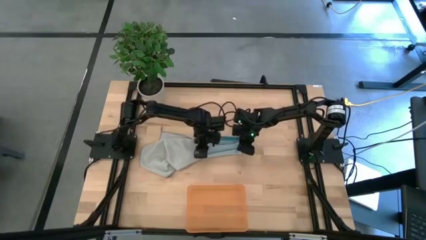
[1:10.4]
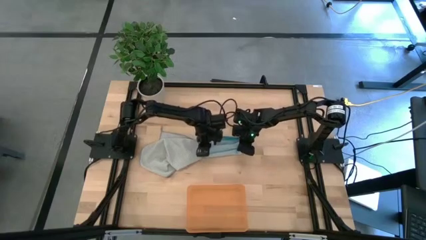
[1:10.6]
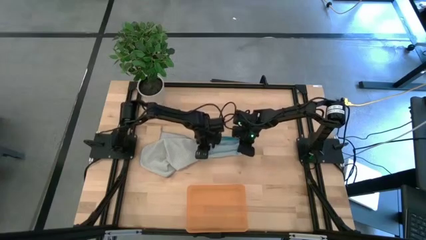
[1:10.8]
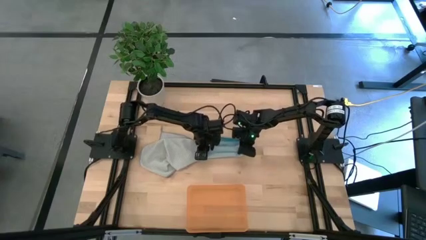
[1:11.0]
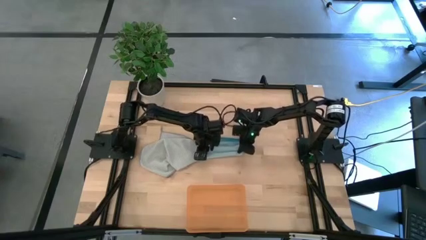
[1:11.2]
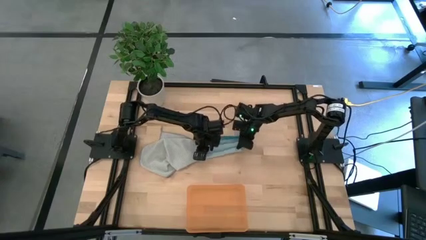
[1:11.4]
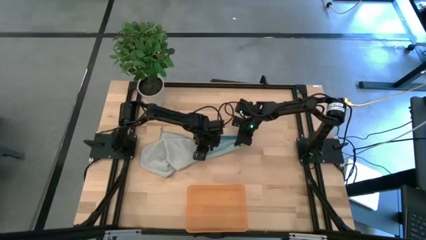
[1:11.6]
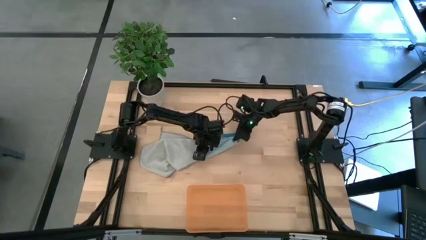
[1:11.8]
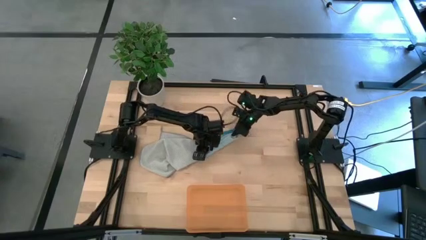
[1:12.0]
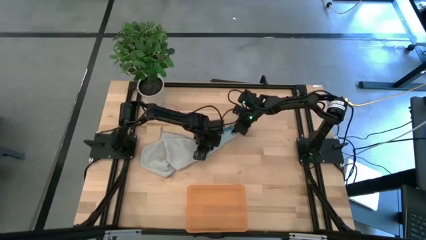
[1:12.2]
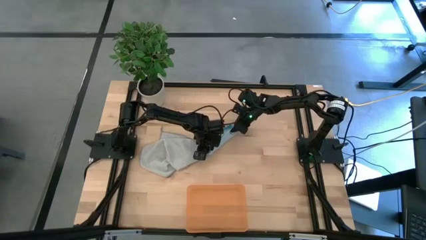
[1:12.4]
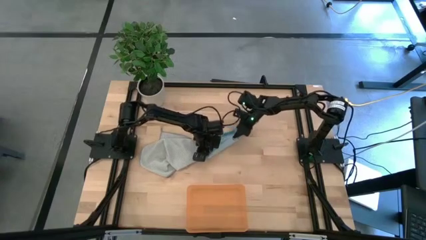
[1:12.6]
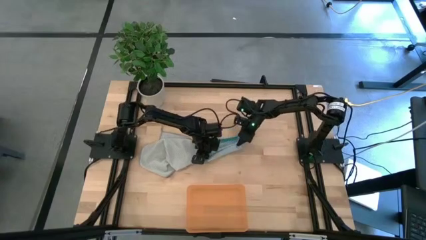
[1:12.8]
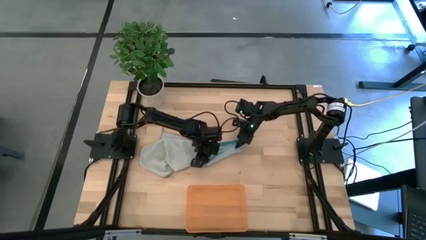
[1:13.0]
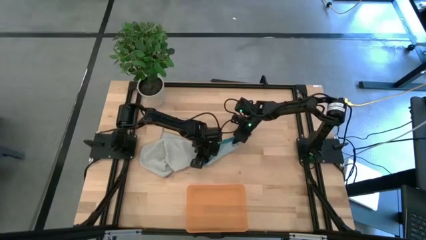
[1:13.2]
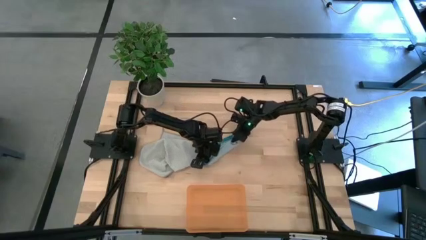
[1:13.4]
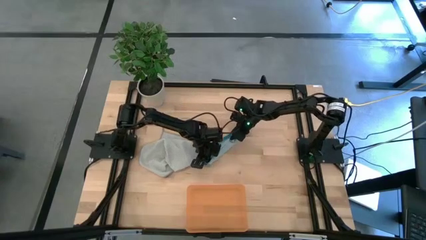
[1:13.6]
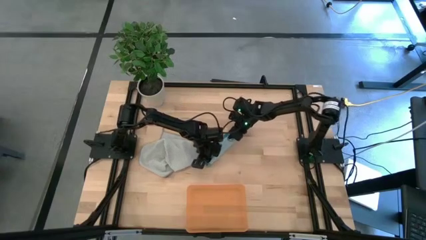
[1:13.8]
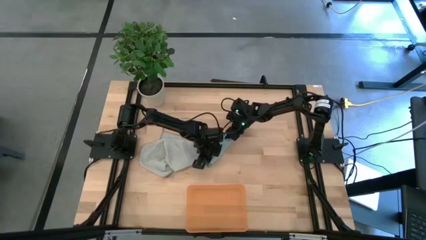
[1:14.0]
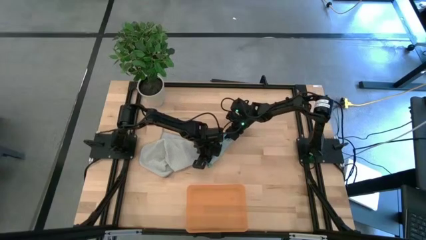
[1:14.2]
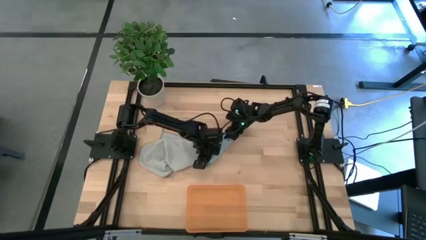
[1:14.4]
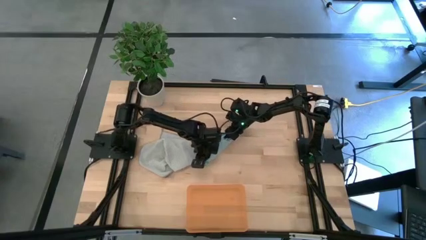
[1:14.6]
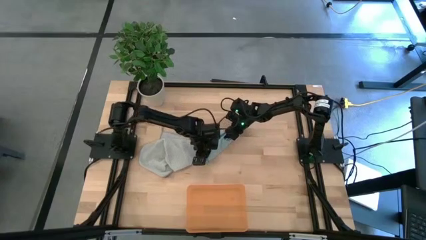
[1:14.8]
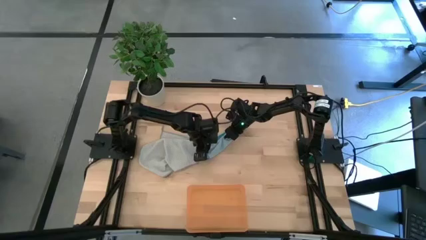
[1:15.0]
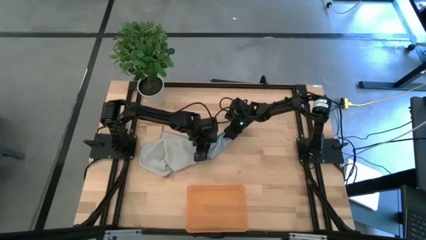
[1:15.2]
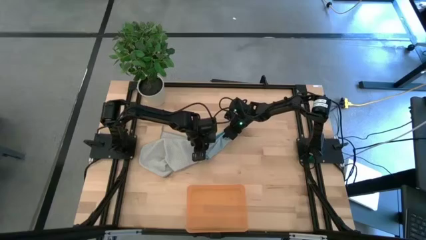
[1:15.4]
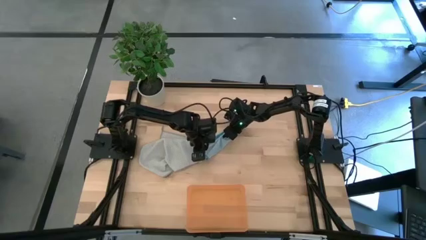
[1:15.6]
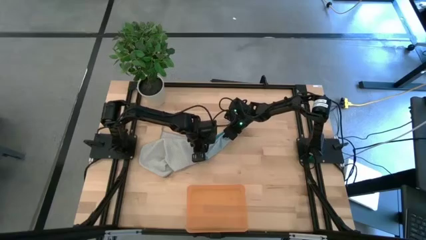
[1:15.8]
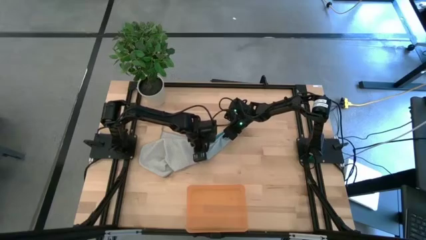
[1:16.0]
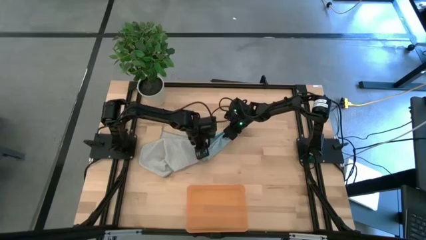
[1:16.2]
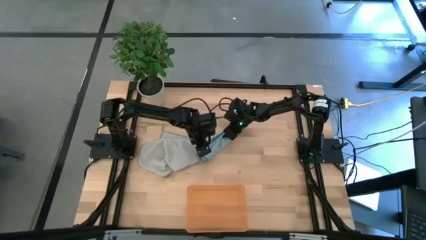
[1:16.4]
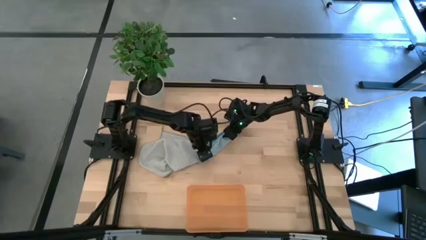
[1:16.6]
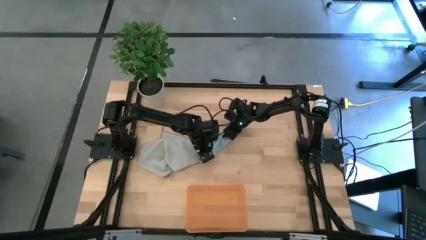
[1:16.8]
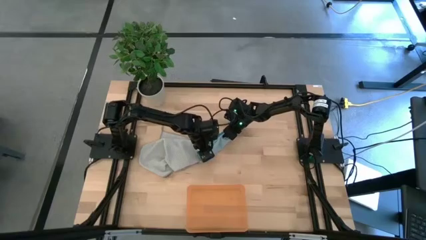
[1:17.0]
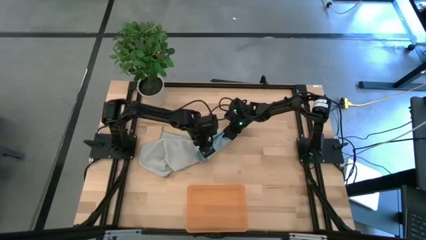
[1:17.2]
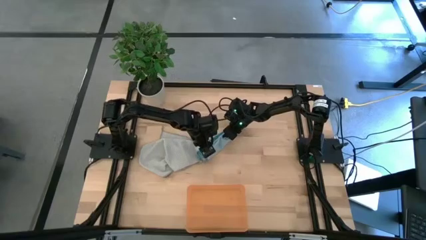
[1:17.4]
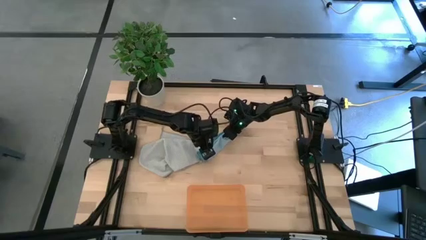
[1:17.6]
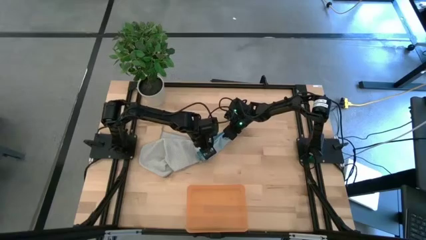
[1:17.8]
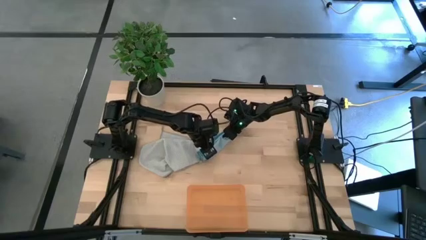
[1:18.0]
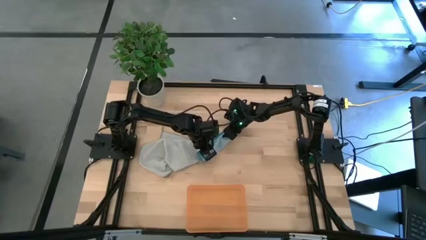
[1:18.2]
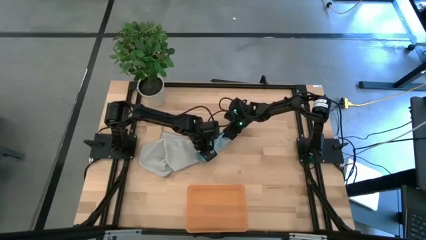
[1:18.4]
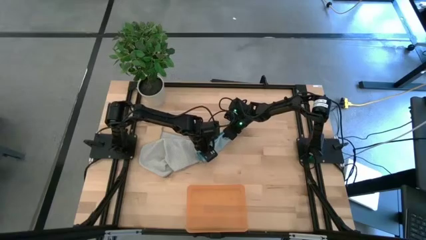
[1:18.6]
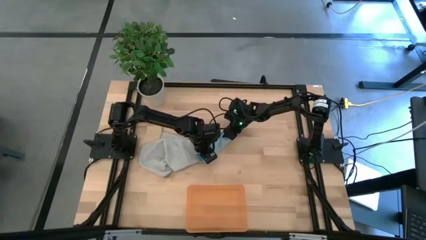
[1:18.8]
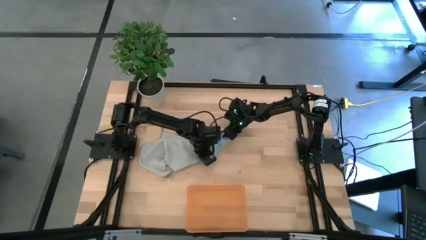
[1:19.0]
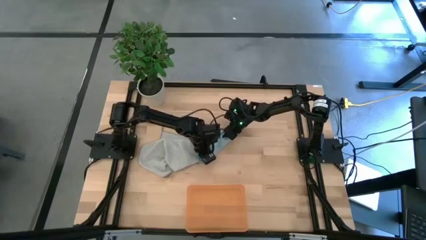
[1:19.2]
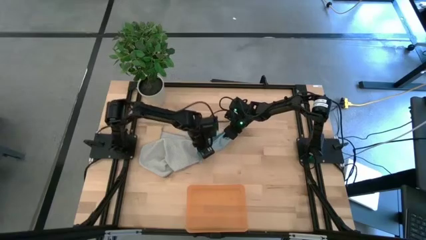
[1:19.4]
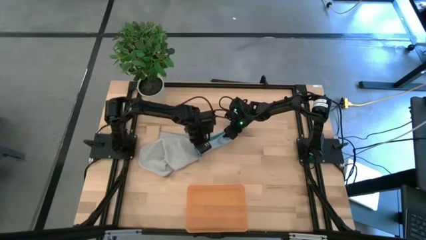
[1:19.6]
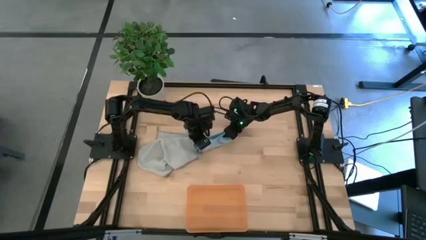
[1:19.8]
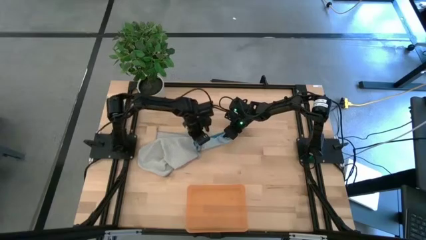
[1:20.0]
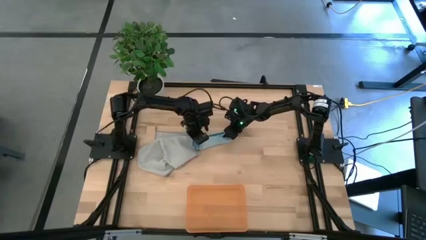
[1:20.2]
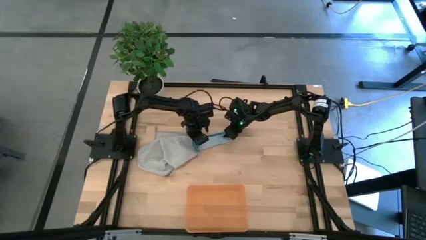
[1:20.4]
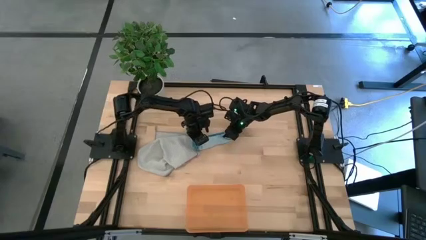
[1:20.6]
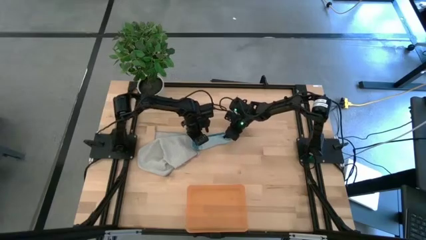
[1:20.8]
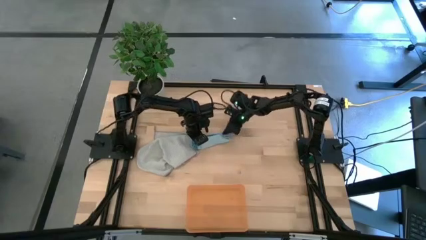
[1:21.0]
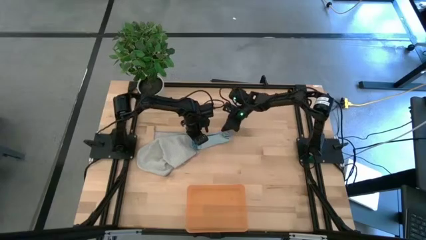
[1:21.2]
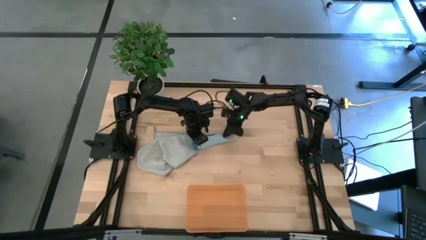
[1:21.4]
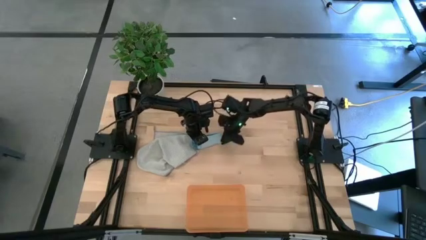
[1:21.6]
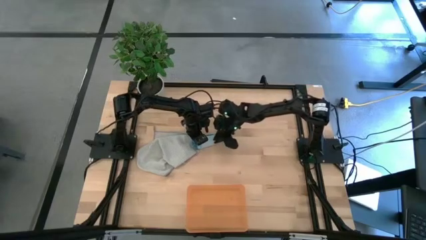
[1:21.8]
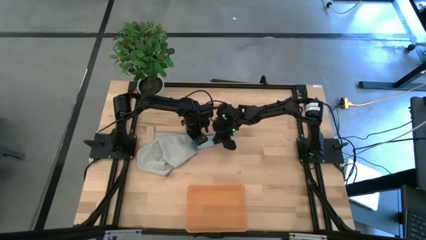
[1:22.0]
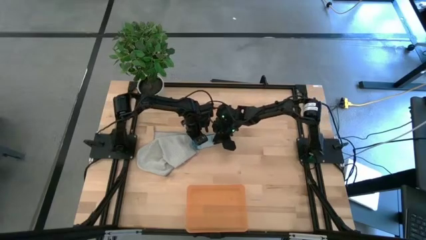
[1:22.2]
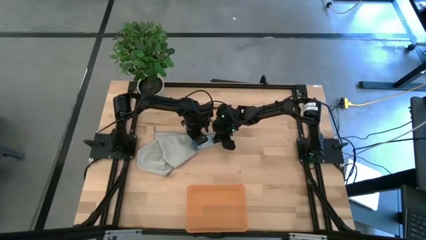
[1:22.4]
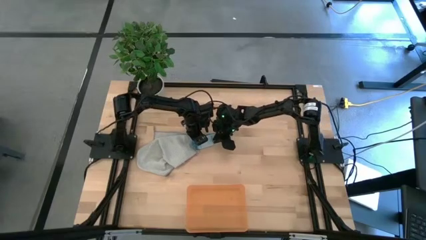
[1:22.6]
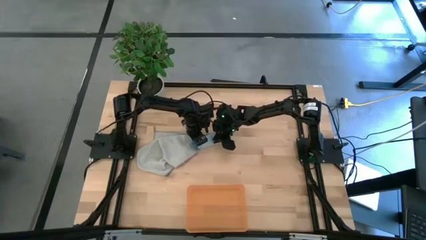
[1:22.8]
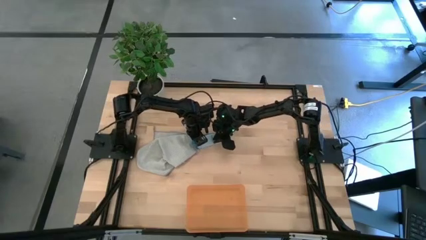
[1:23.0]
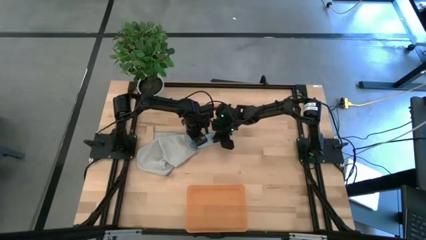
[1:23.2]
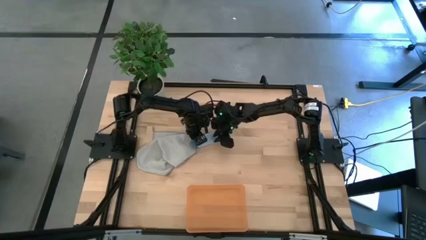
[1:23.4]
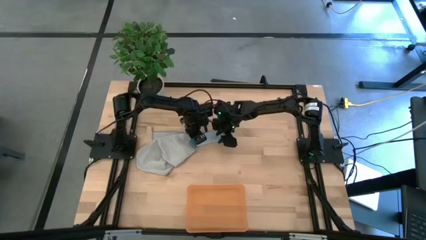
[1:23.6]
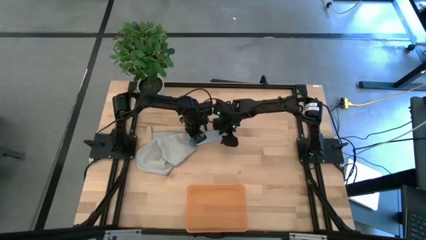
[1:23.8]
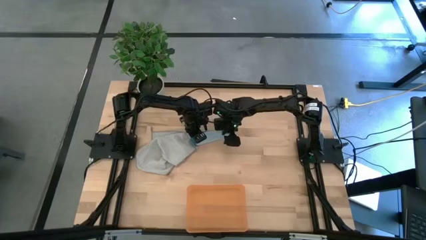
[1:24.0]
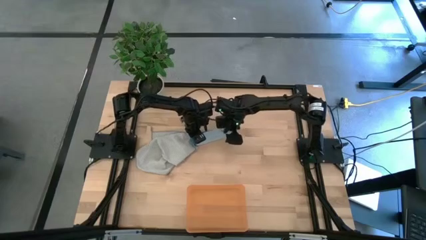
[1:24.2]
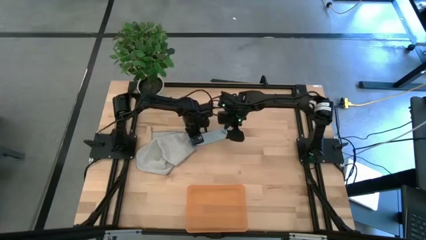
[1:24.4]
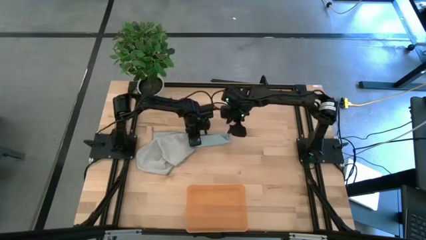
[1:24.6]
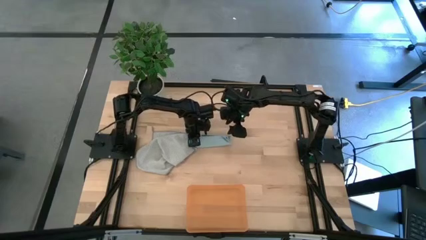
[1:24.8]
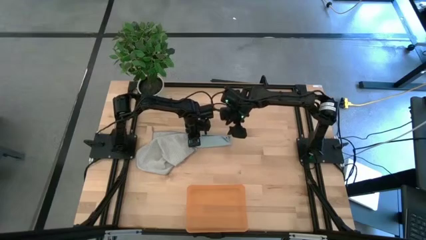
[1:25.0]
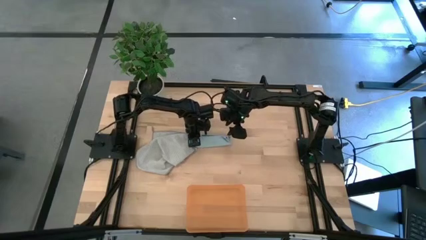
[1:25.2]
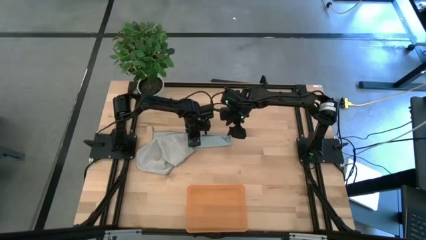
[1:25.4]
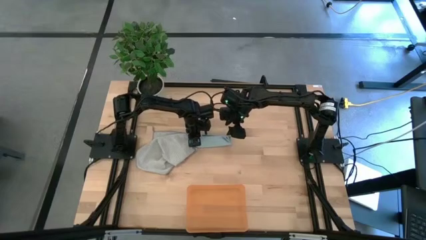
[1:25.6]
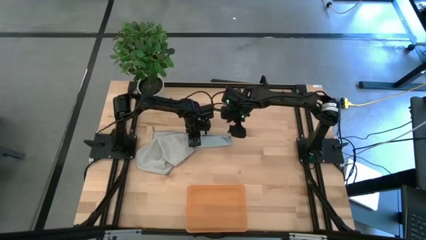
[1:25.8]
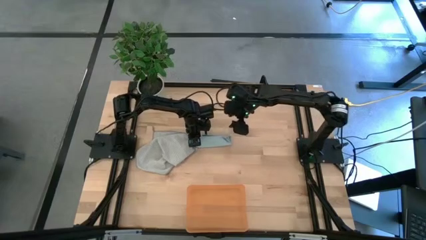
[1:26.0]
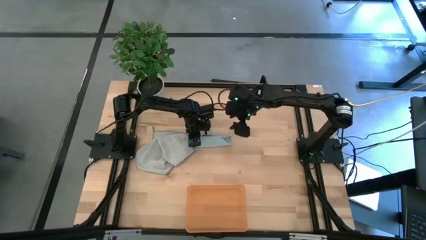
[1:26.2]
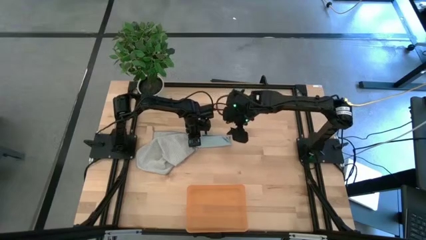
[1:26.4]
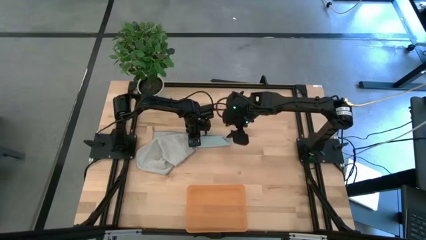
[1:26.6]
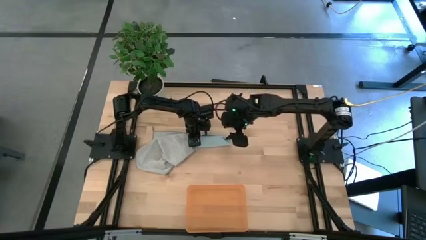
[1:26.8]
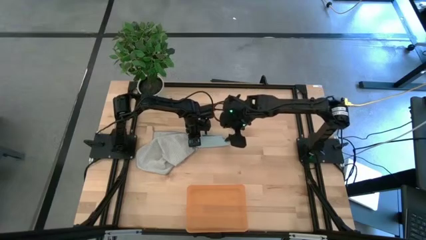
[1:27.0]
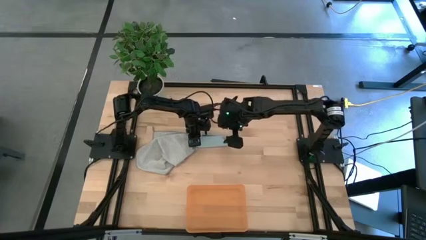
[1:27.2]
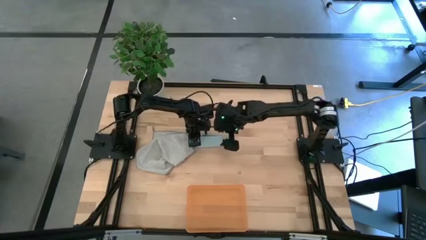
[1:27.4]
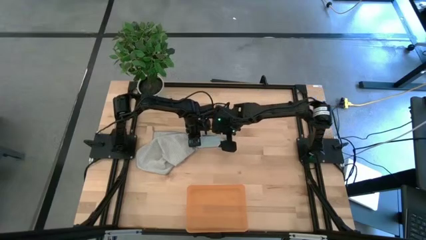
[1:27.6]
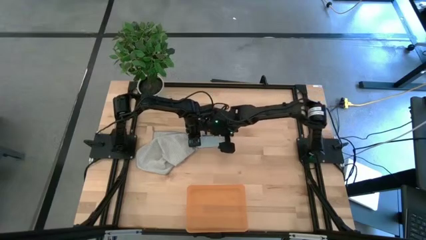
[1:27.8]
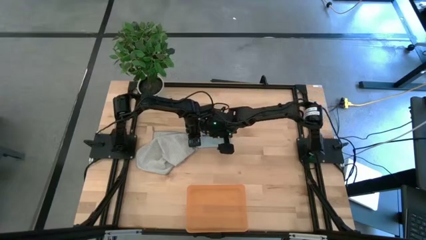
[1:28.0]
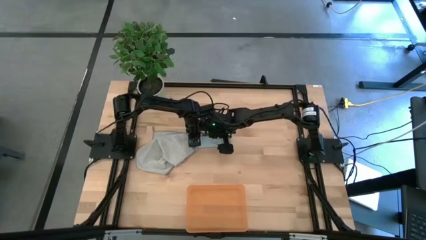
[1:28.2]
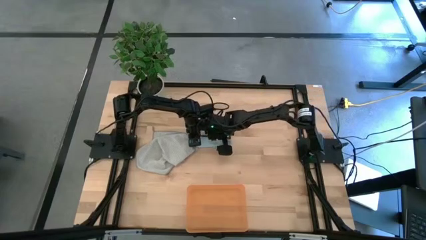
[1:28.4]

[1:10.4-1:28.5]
Task: Roll microfiber towels into tight, uniform cylinder then place into a basket
Roll the blue towel
